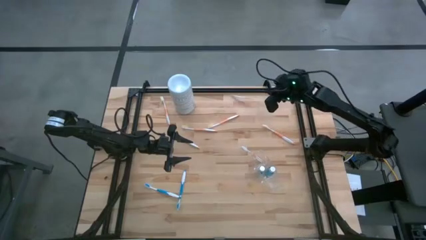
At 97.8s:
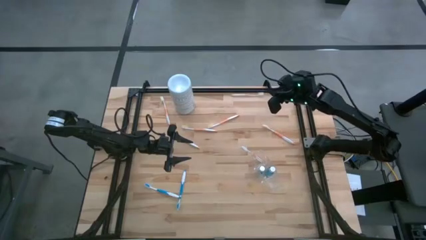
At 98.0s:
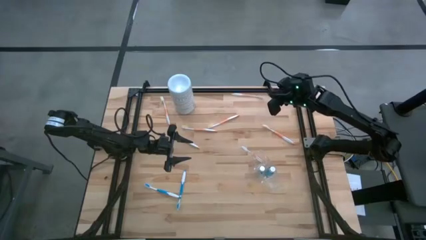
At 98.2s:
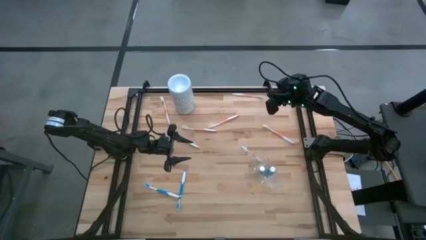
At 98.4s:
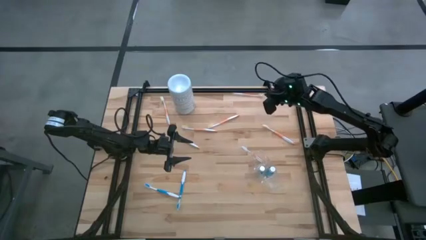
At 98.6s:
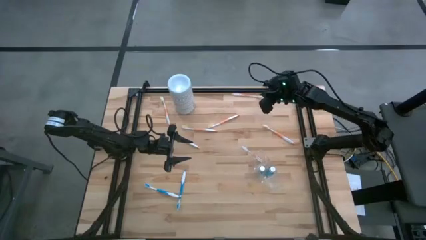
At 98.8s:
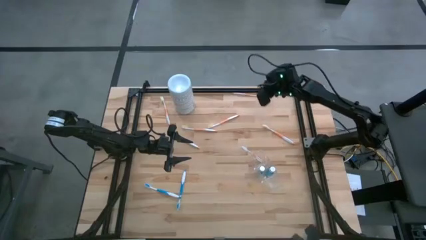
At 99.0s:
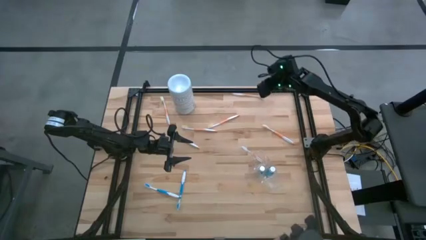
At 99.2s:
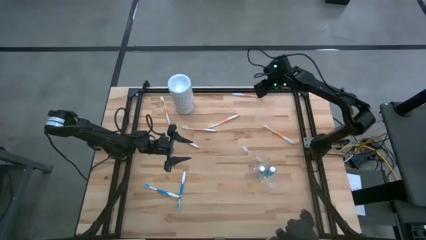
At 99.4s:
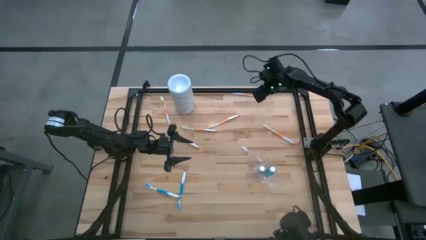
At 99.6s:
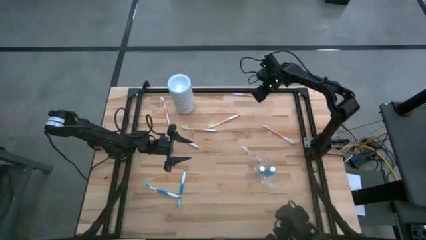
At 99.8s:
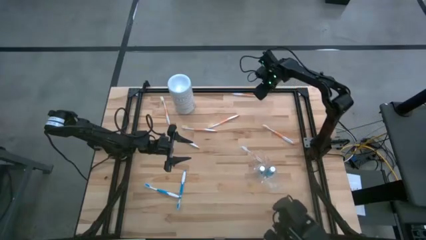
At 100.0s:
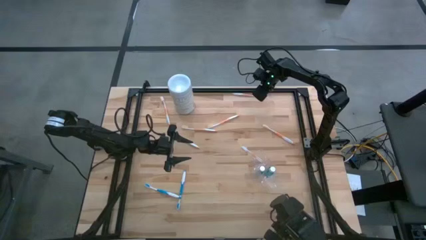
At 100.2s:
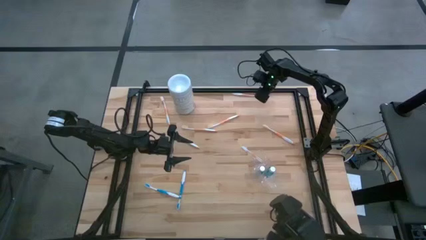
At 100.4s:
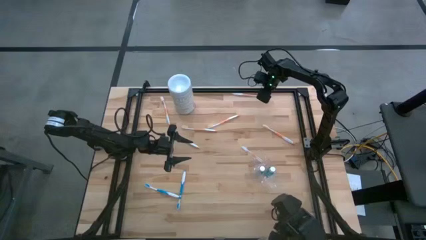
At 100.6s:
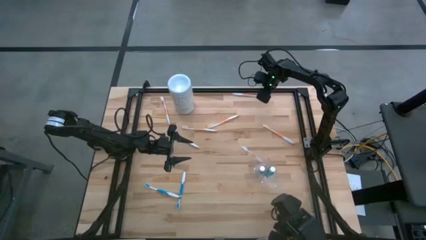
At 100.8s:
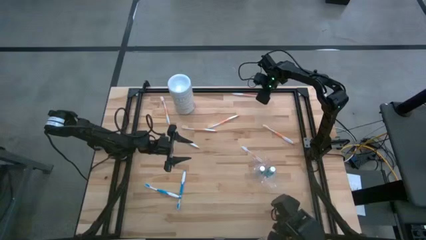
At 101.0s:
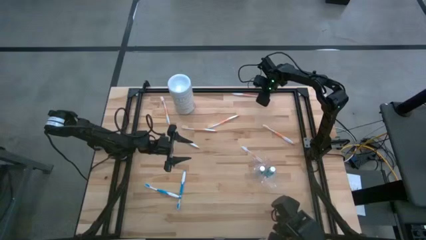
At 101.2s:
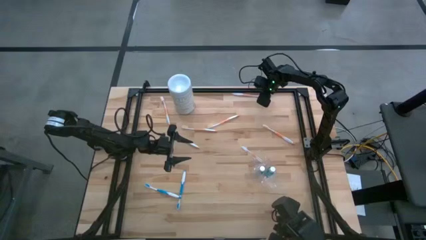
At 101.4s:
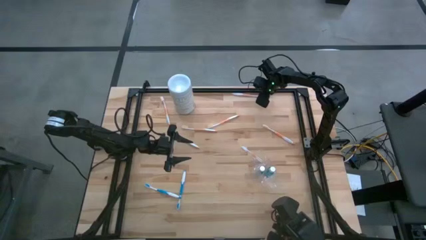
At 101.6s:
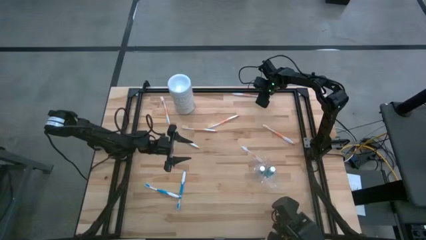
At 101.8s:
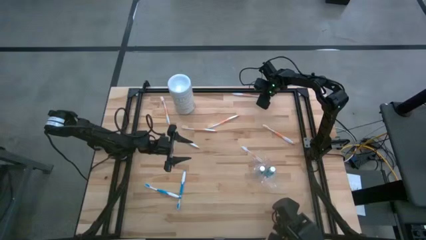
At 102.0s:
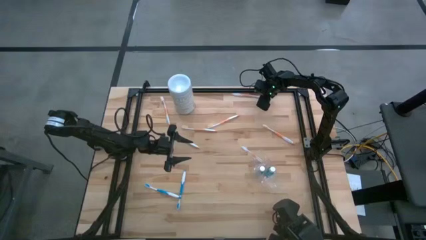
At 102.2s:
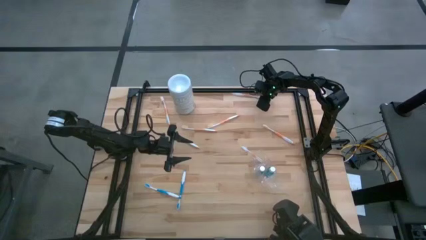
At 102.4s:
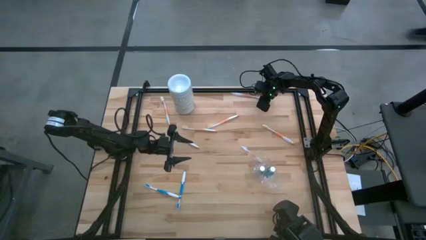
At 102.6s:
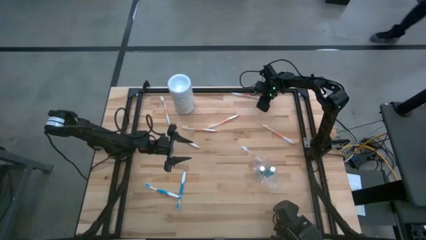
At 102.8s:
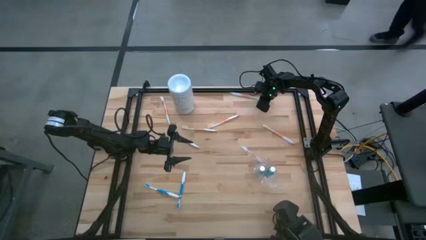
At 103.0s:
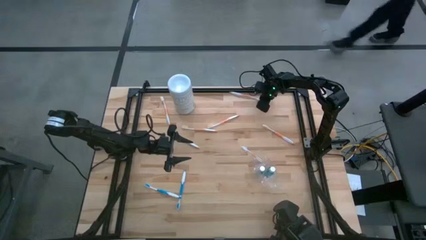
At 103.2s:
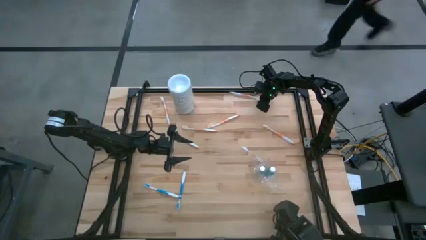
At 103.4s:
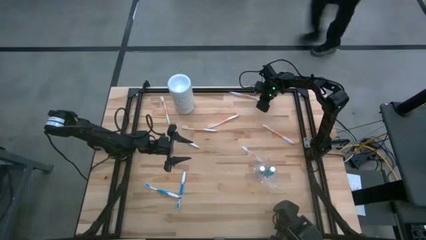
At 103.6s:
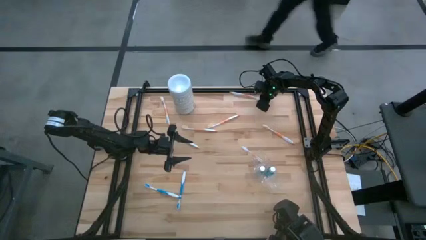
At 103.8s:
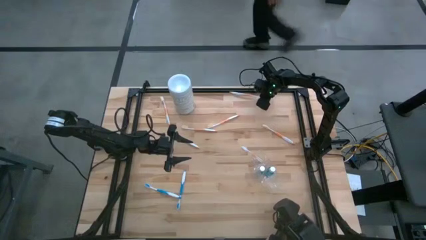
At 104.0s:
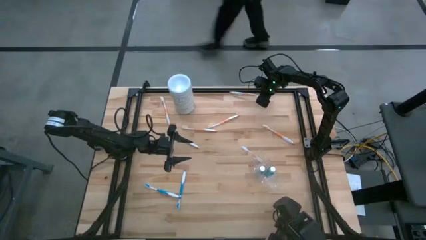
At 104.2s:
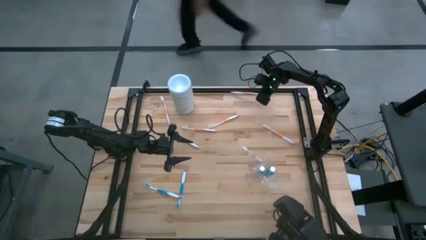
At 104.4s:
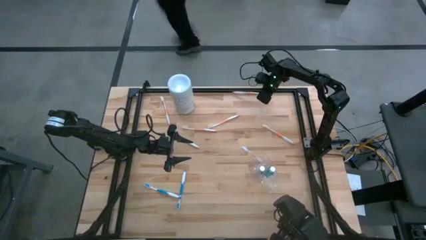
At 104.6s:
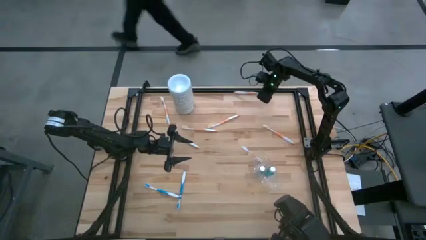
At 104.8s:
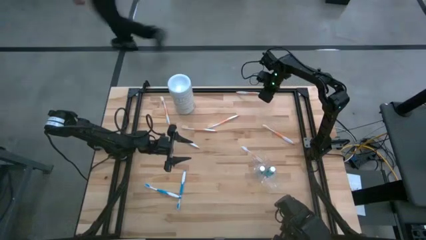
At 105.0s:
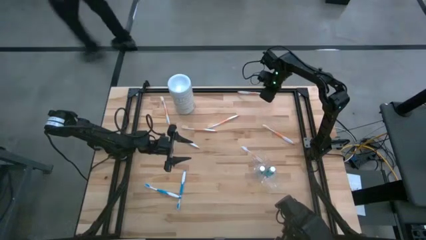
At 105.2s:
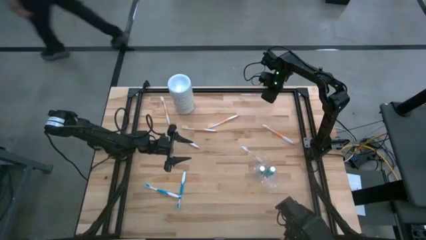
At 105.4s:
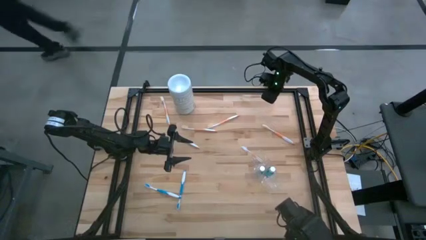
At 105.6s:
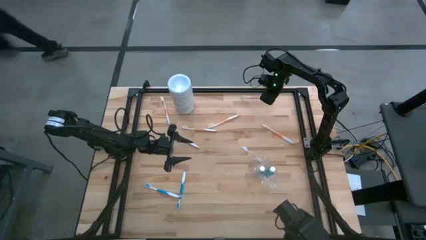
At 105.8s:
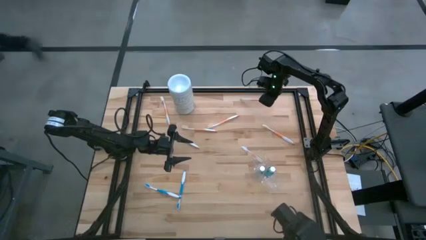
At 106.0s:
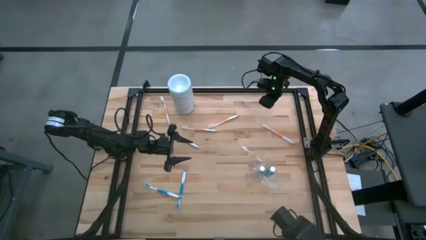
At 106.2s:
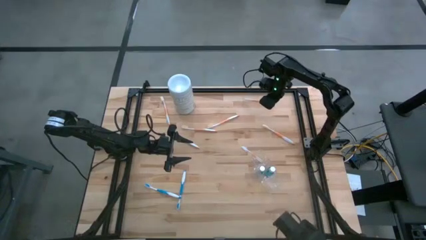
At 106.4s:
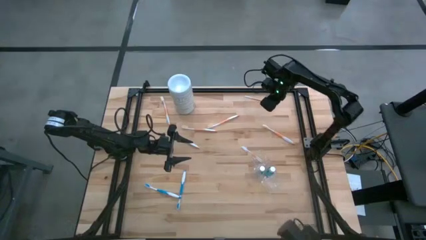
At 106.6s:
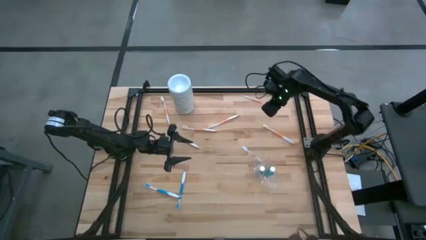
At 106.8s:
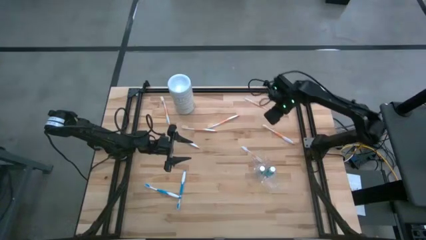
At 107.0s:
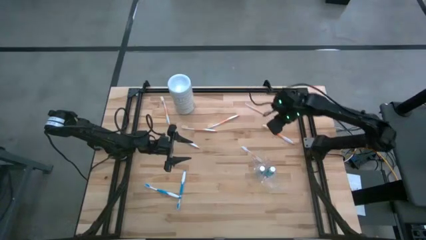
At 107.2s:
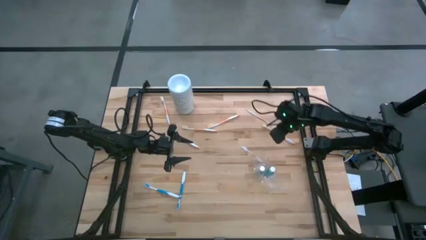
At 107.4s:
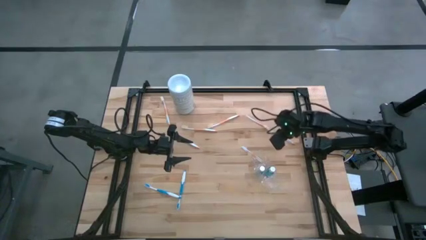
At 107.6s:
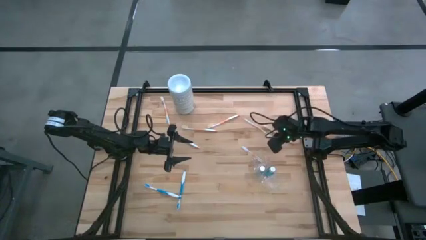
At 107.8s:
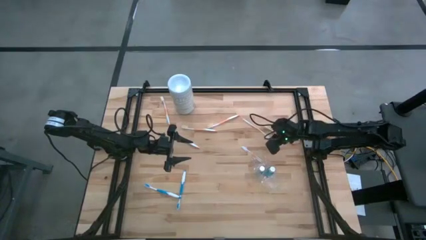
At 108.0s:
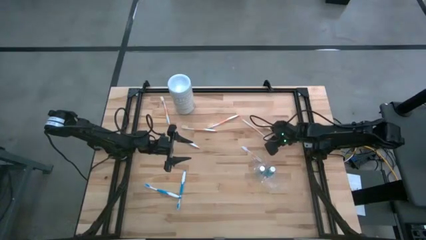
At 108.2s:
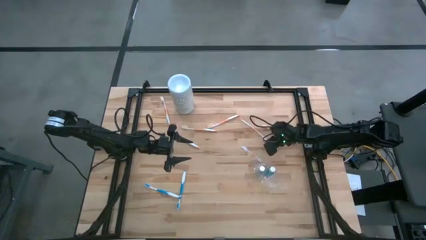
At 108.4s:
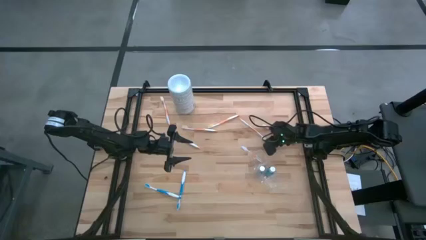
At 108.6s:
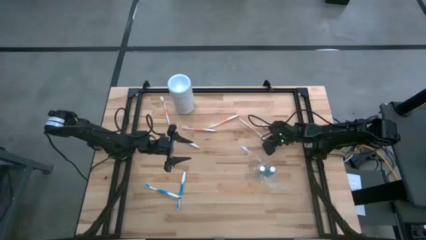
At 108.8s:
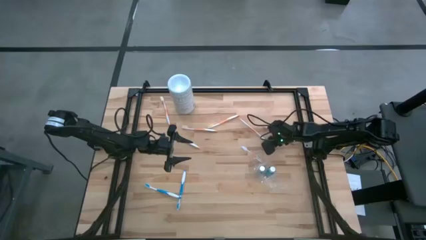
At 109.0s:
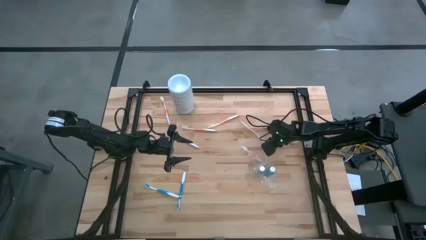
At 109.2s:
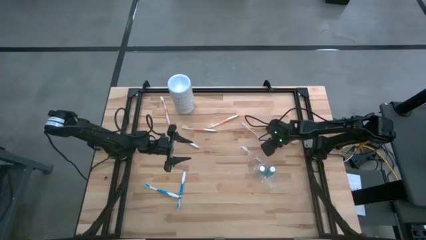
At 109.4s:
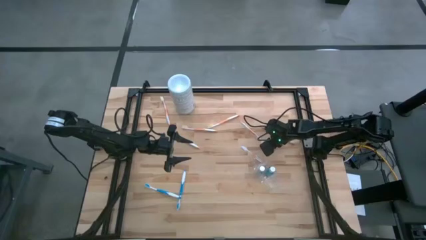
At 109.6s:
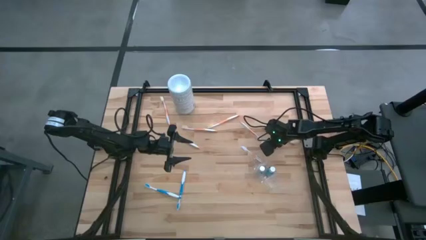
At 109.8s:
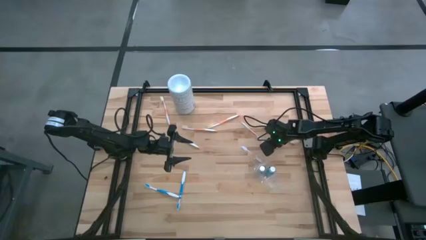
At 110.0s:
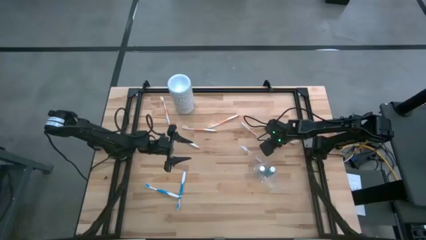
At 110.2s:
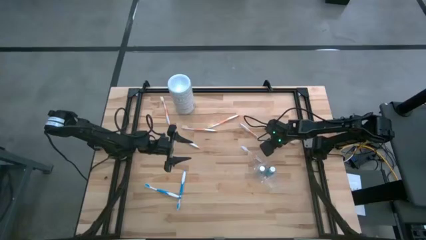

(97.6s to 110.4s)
Task: Pick & Place toothbrushing station
Put the orange toothbrush into the top section of the transparent organizer

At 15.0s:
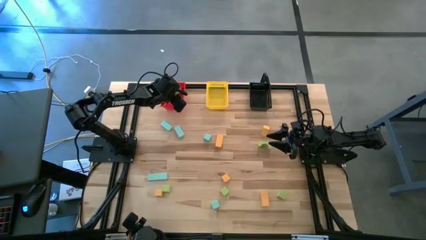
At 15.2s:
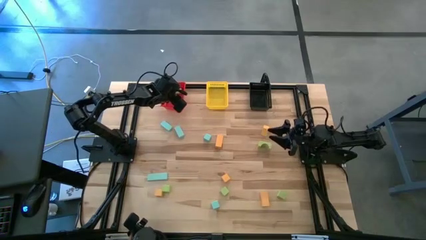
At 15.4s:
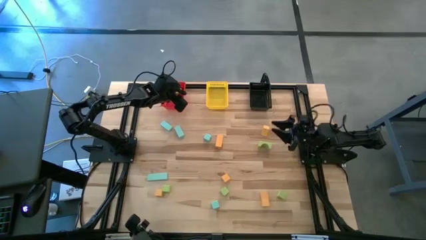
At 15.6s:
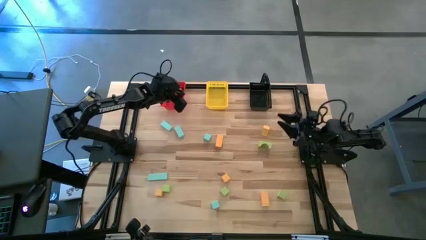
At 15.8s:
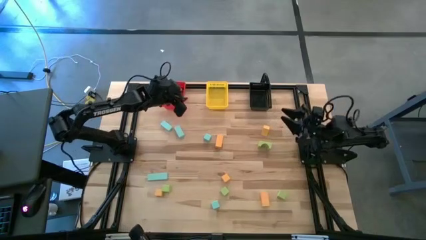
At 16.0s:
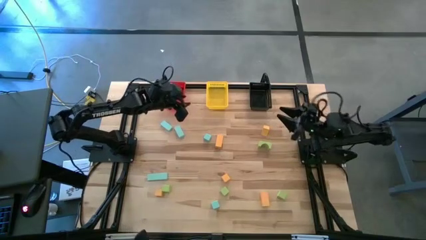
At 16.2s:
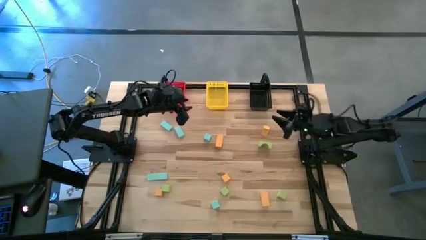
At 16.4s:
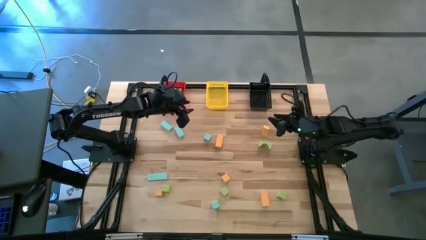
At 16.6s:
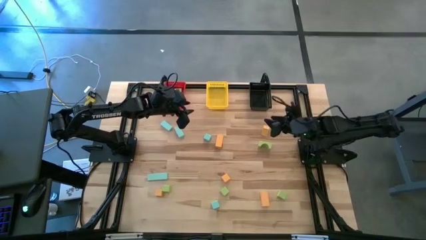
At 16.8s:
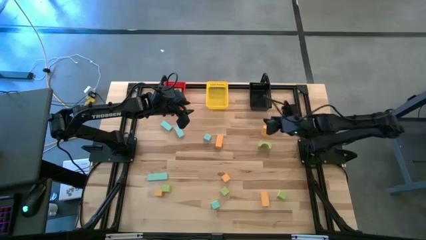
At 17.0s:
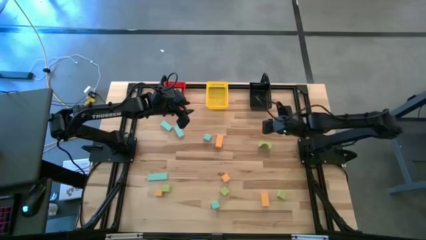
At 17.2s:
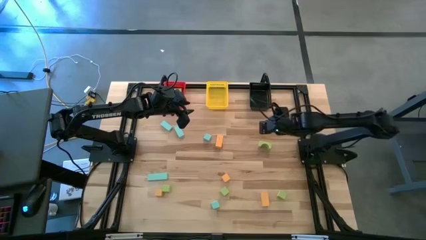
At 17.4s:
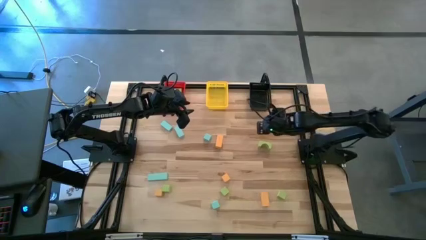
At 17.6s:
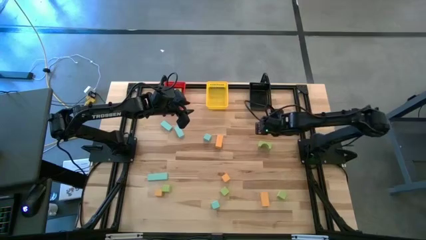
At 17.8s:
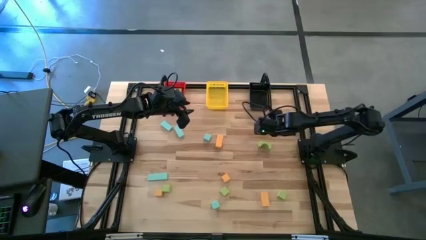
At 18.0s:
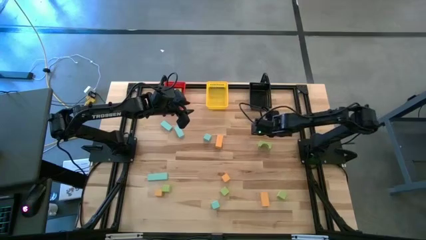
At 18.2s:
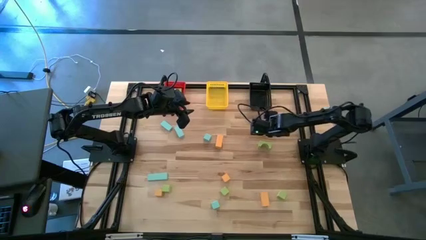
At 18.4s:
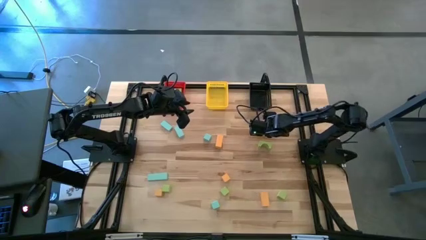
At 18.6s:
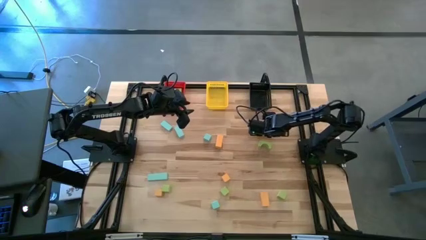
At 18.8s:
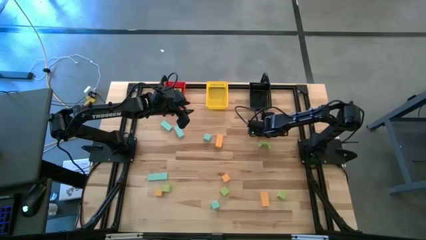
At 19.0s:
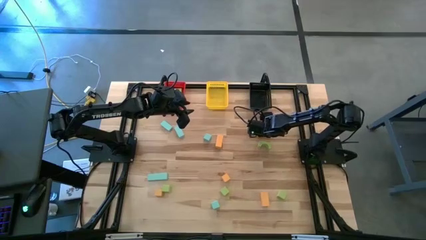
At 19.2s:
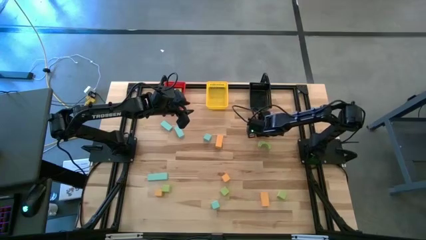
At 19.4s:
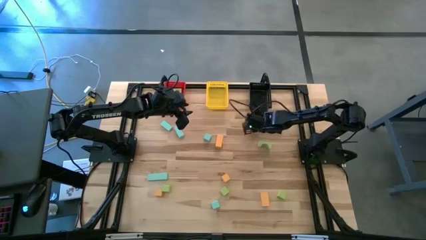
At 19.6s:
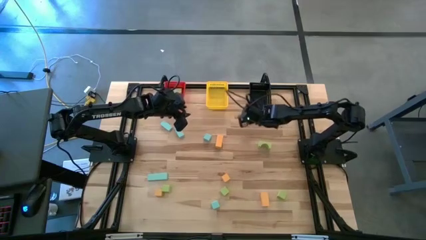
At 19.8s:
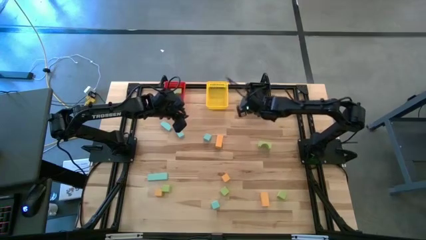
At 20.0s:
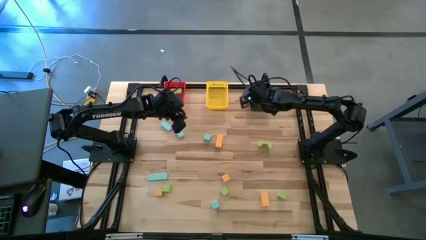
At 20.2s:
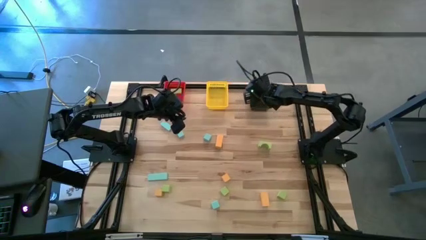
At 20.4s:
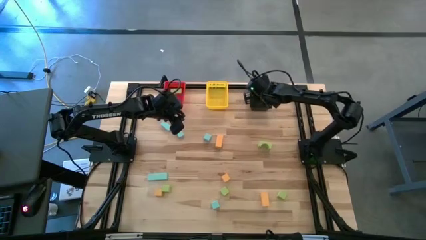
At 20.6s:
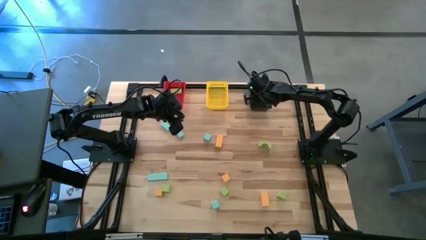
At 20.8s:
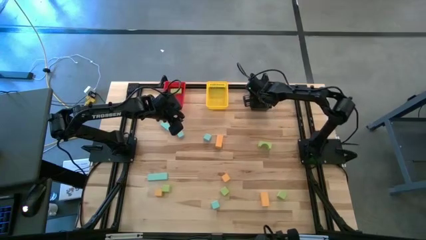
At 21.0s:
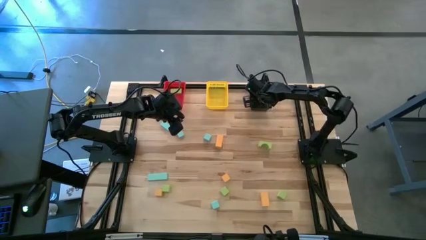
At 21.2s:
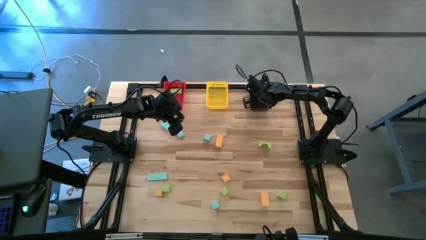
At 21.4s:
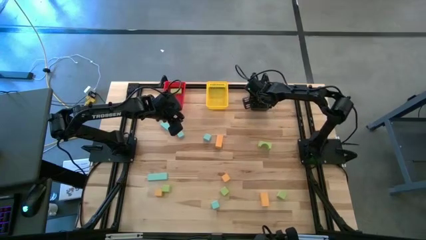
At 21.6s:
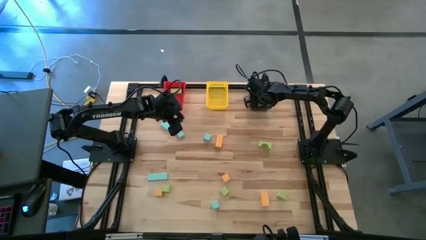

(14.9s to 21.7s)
Task: Sort & place blocks by color
Put the yellow block into the black bin
